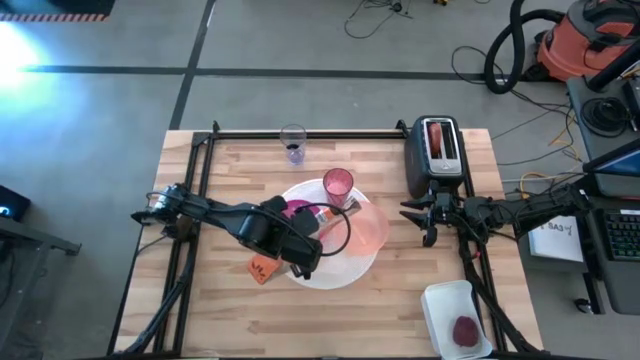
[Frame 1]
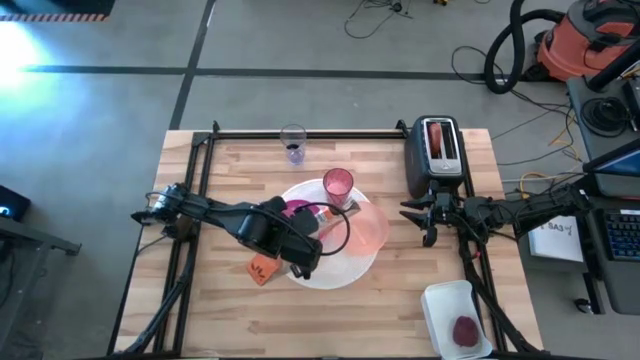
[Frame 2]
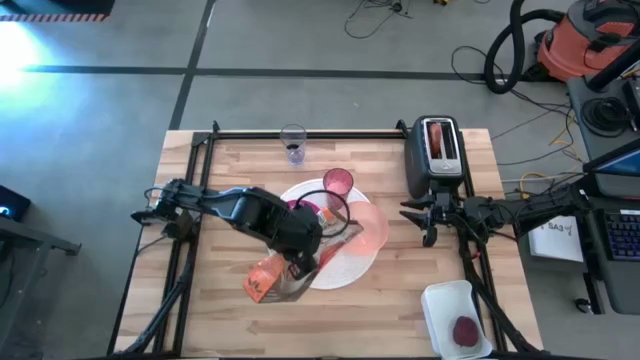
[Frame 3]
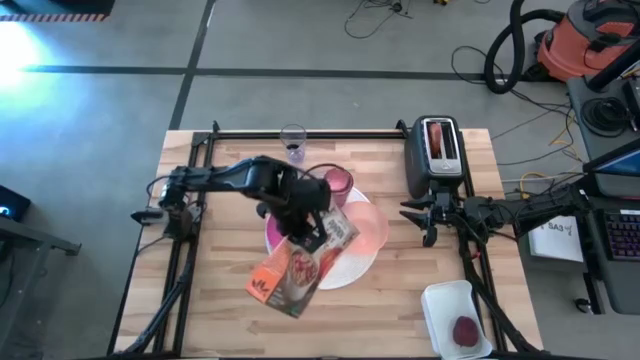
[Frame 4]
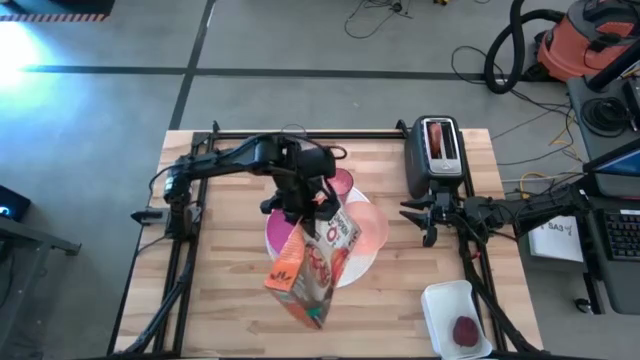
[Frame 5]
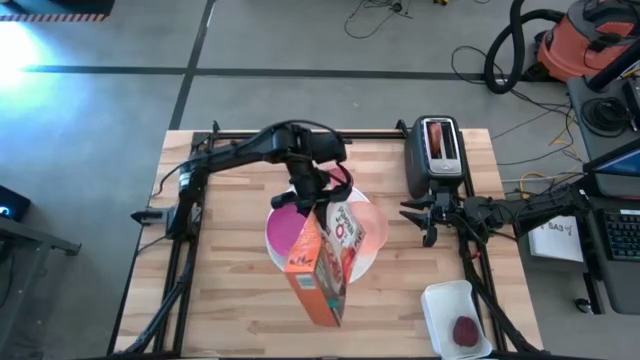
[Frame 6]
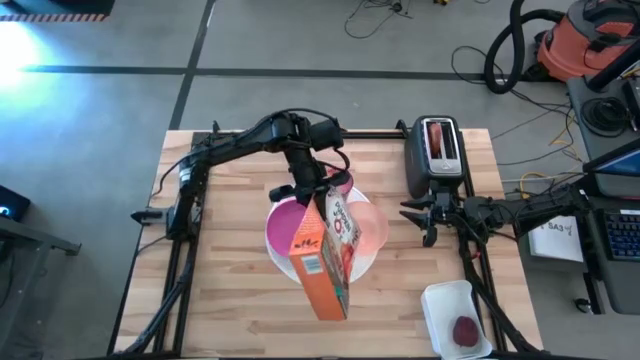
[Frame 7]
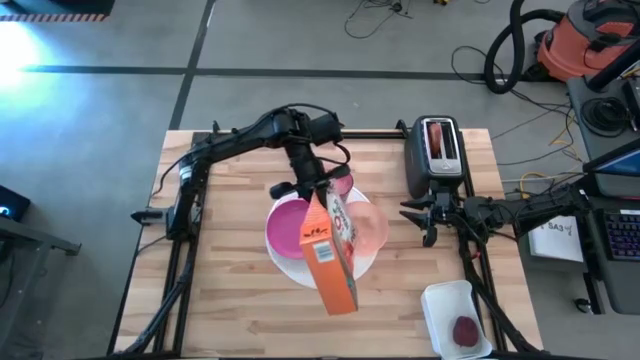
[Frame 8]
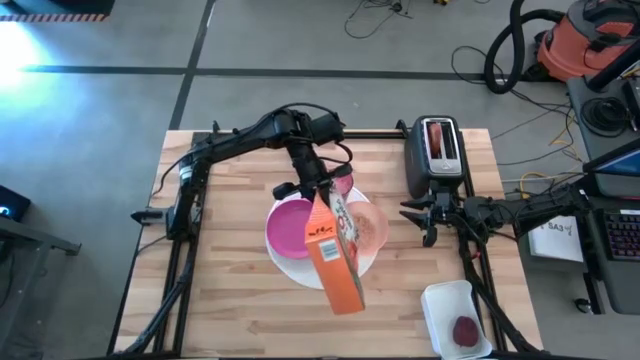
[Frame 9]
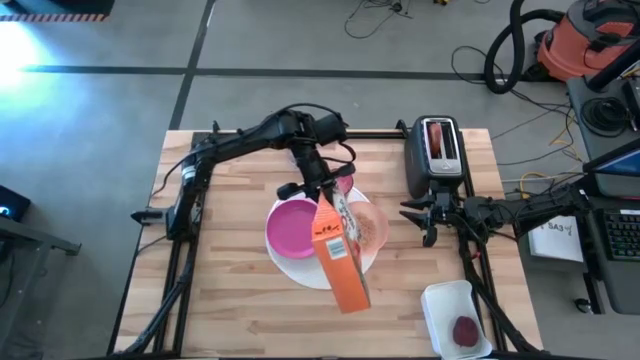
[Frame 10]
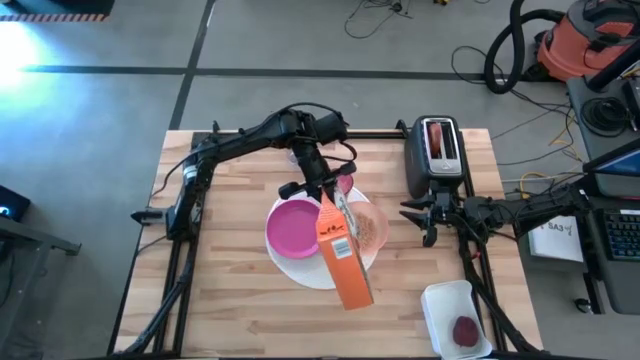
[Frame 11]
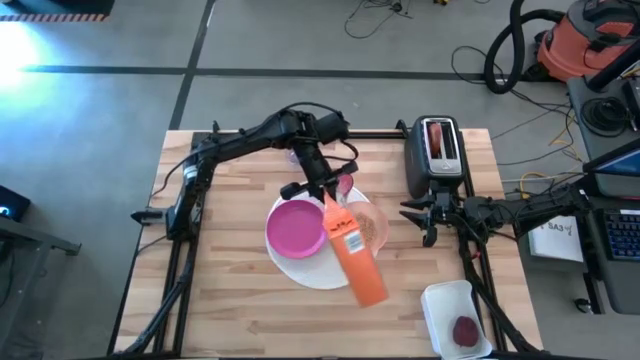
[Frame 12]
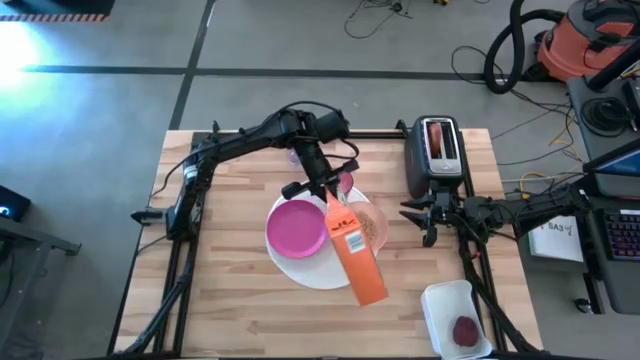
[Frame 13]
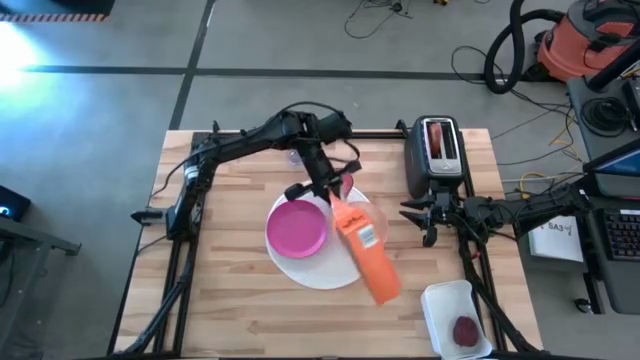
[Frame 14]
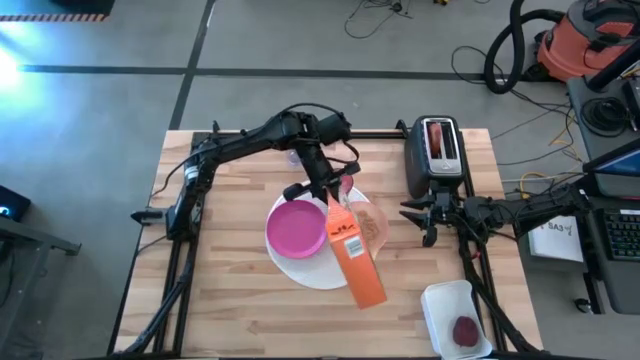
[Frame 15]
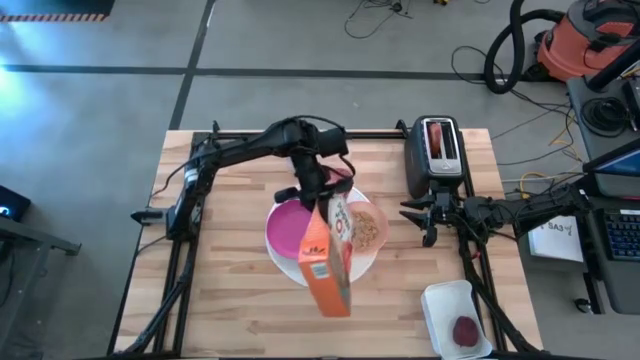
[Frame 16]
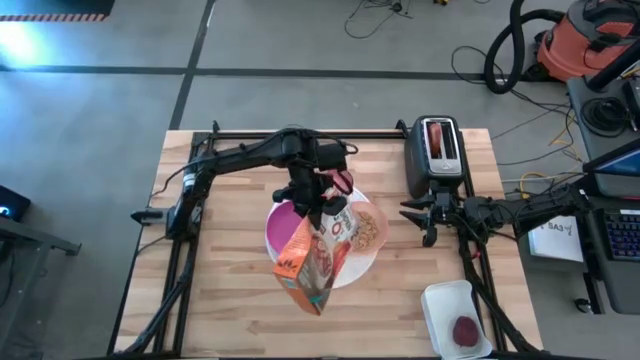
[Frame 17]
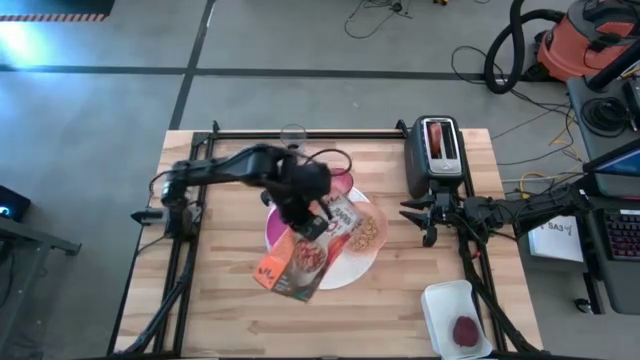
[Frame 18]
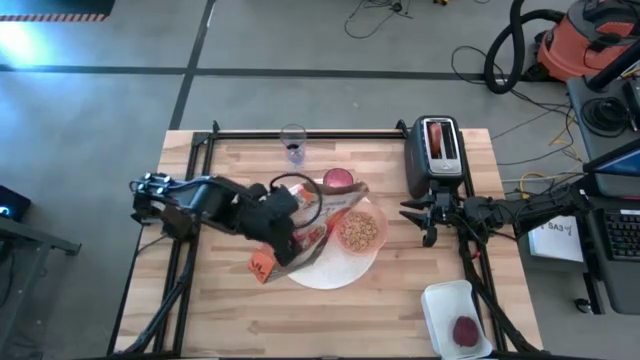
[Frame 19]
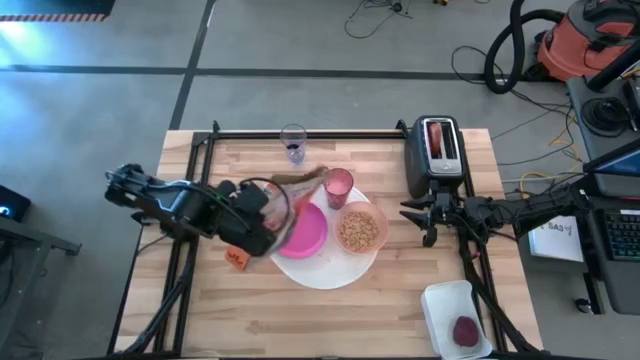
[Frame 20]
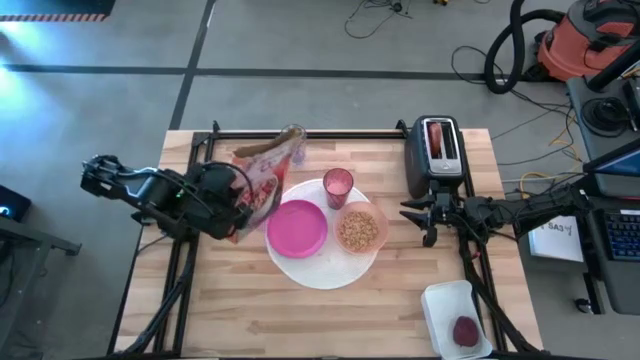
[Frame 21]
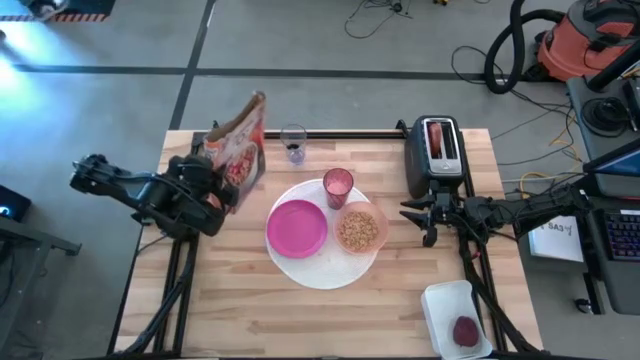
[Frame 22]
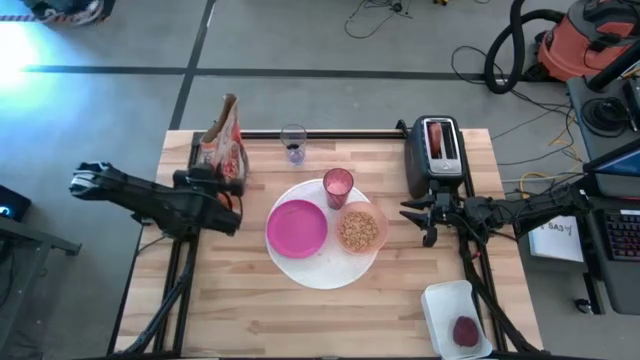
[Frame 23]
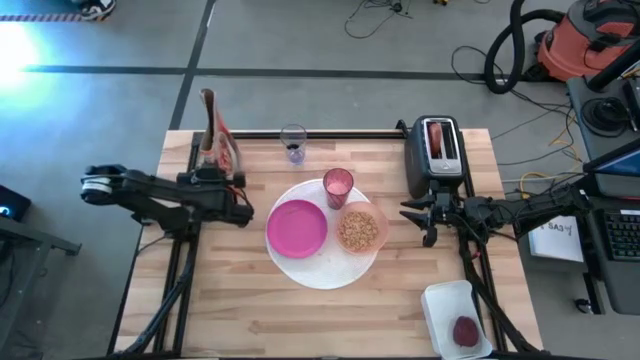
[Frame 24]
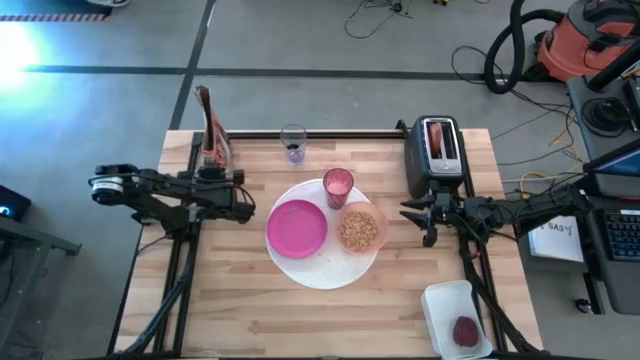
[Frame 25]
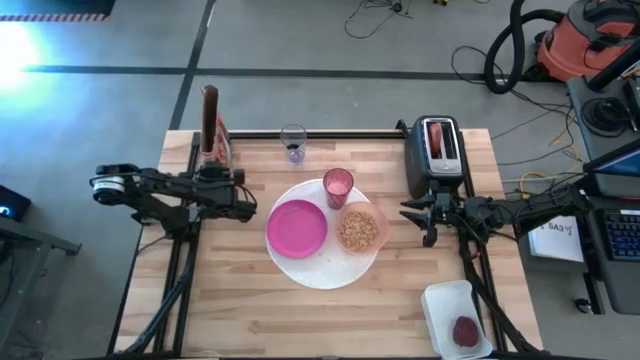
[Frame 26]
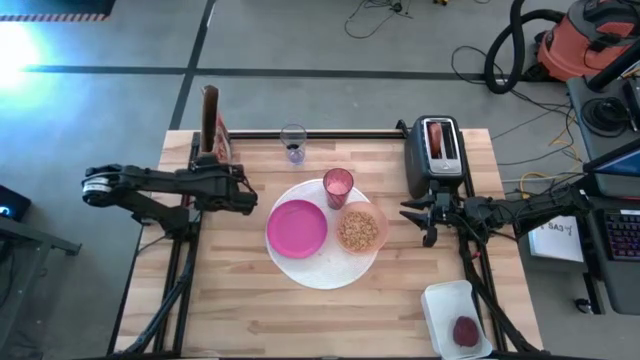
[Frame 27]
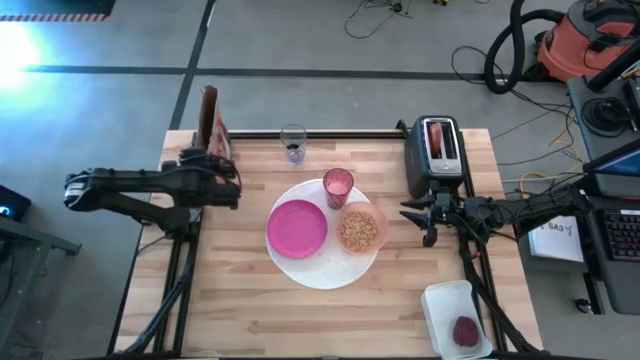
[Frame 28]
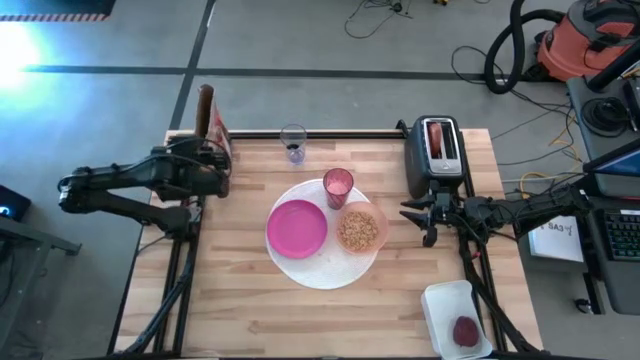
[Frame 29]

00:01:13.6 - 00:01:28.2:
Task: Arrange a breakfast setting
Pour the cereal from the cereal box into the orange bowl

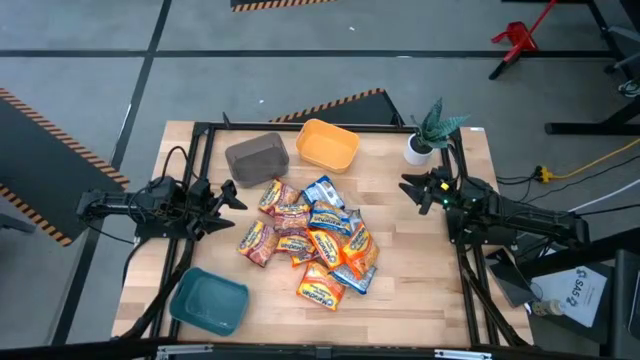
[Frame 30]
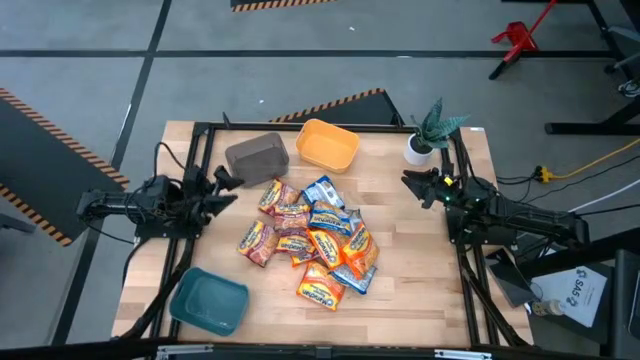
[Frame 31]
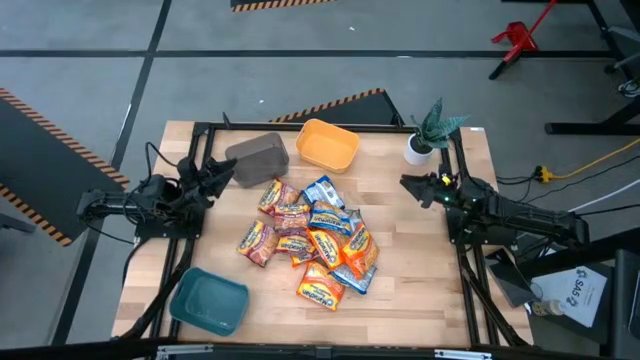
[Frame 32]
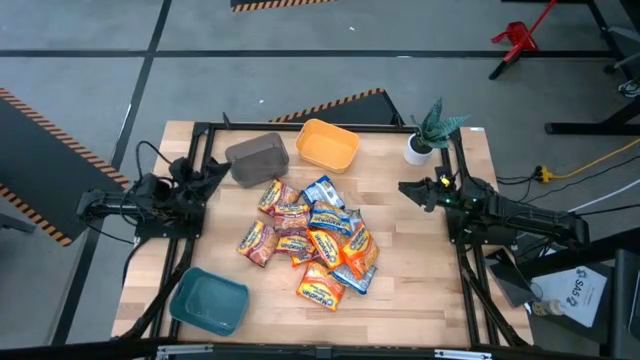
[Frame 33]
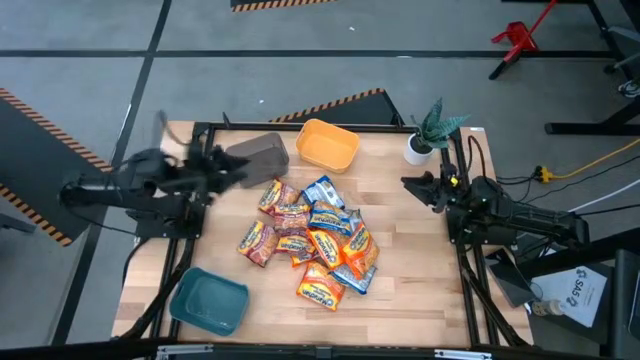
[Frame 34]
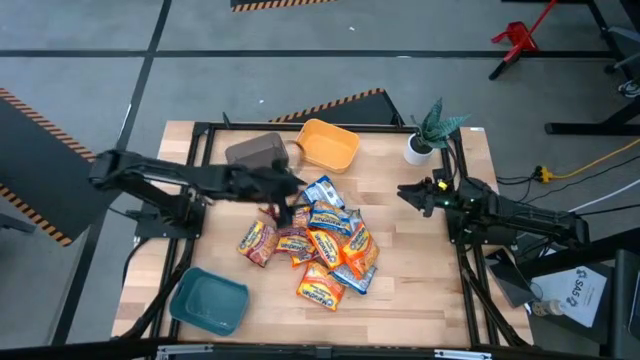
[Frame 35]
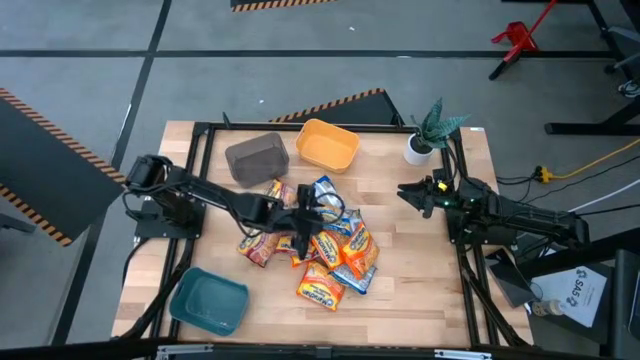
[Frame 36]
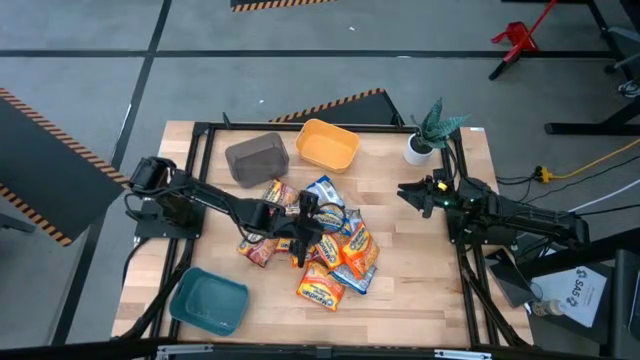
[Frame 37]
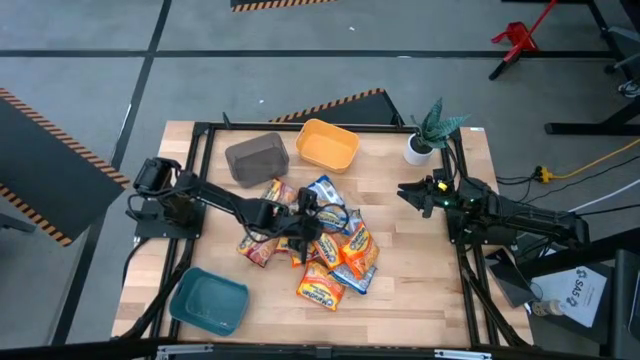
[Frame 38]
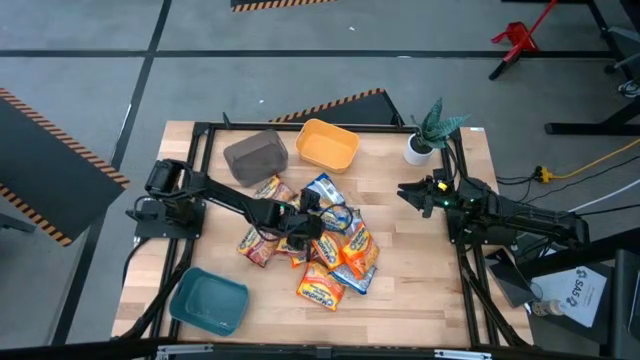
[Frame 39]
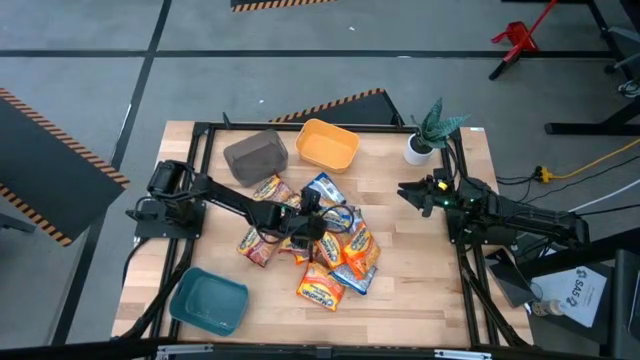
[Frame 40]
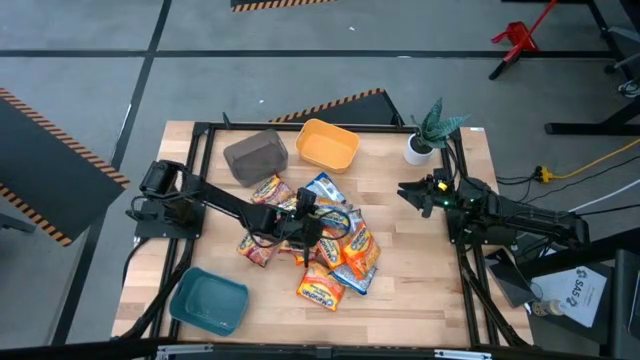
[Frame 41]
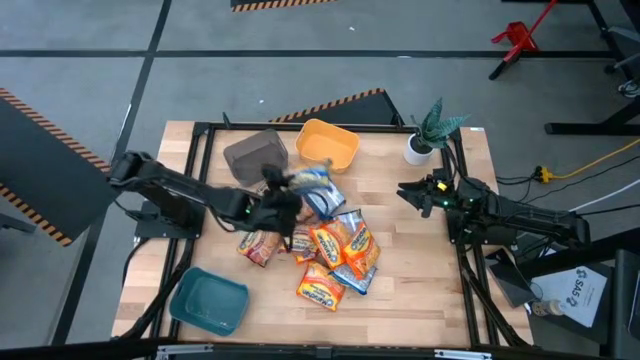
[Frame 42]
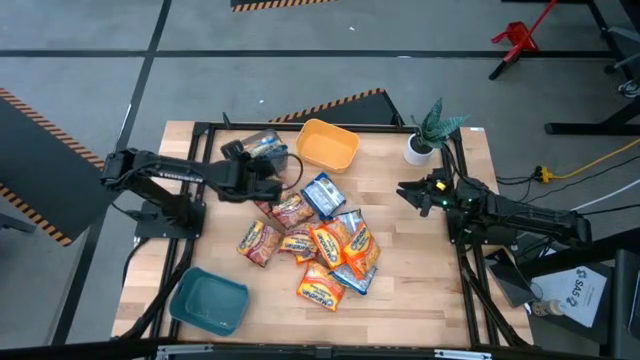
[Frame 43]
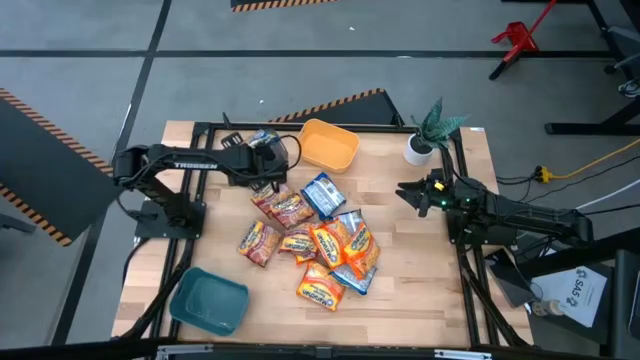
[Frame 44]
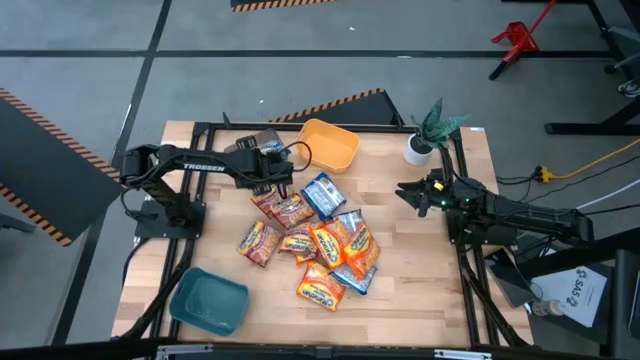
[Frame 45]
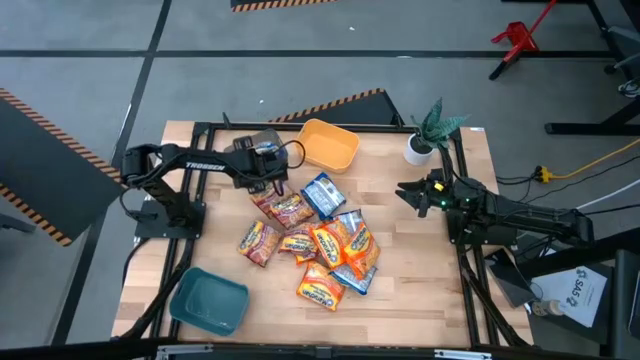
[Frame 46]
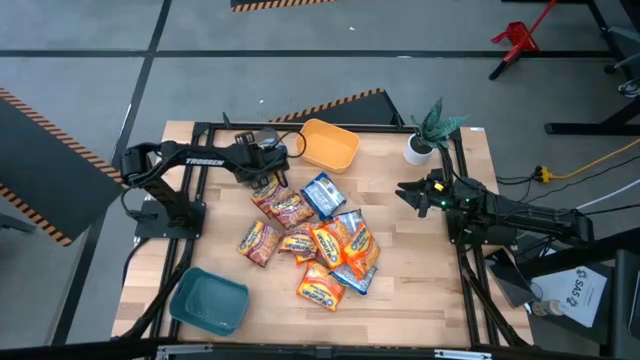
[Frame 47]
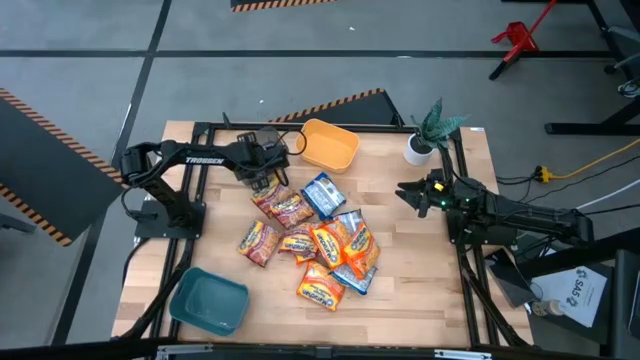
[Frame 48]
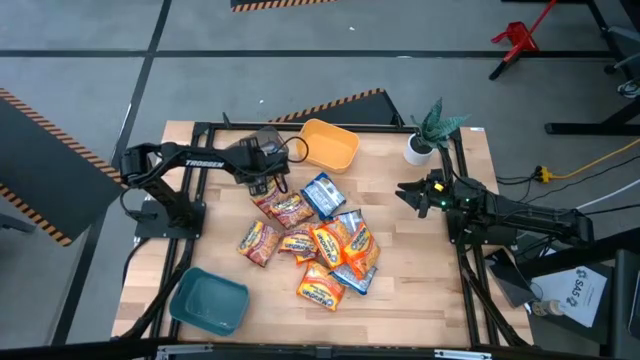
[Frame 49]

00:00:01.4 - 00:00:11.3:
Task: Sort Maruchan noodles
Put the pack of blue ramen noodle soup into the transparent black bin
